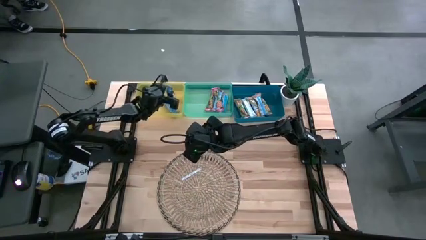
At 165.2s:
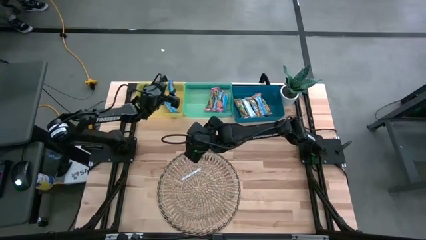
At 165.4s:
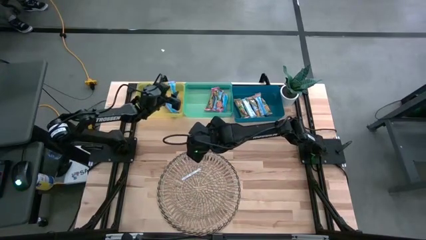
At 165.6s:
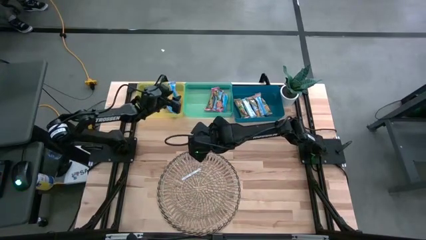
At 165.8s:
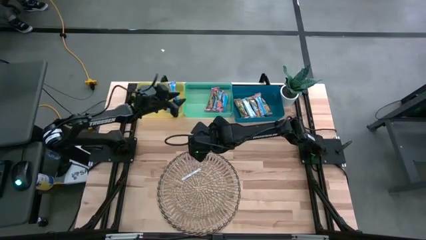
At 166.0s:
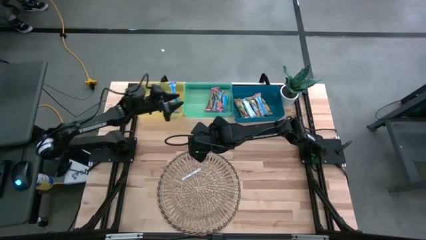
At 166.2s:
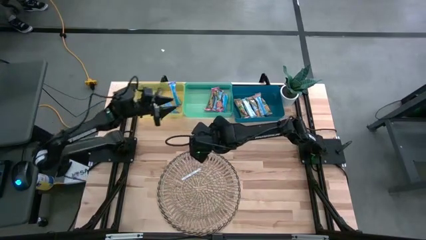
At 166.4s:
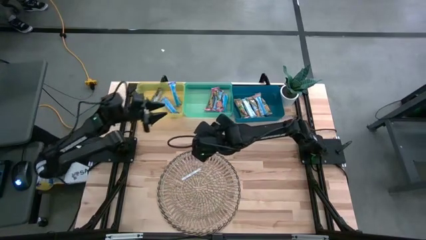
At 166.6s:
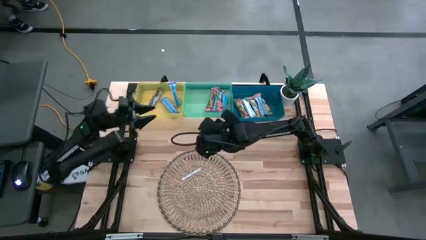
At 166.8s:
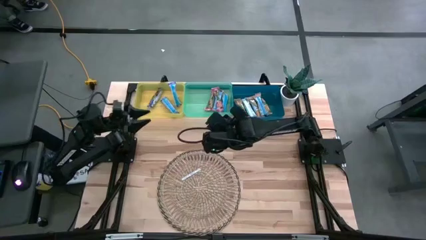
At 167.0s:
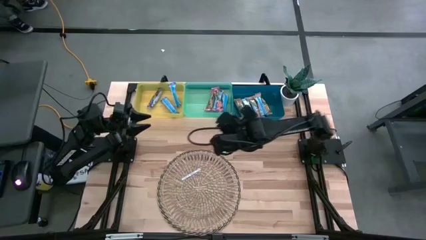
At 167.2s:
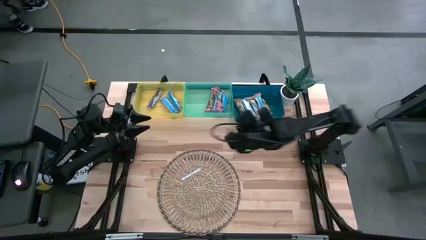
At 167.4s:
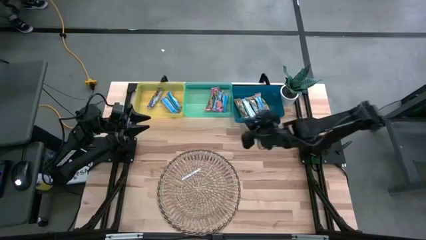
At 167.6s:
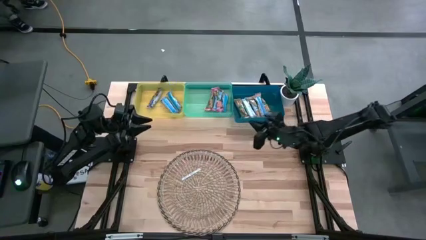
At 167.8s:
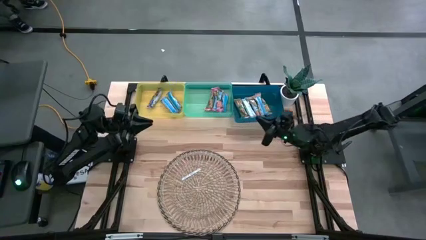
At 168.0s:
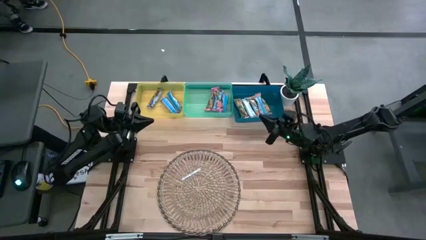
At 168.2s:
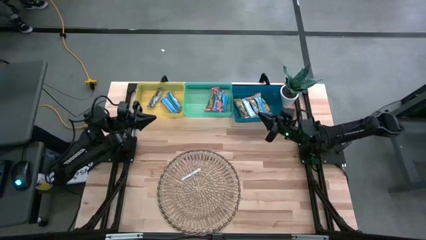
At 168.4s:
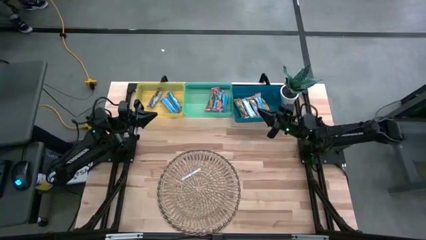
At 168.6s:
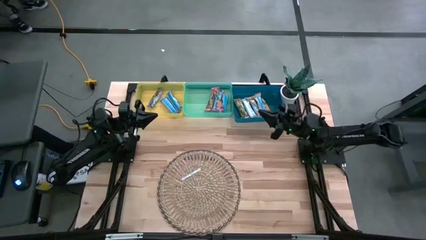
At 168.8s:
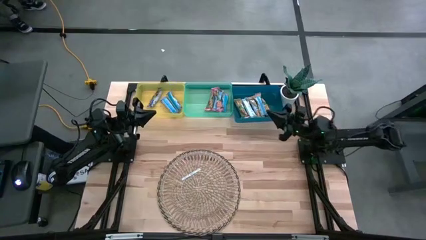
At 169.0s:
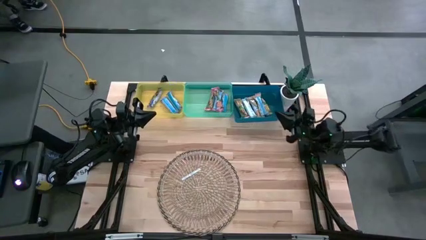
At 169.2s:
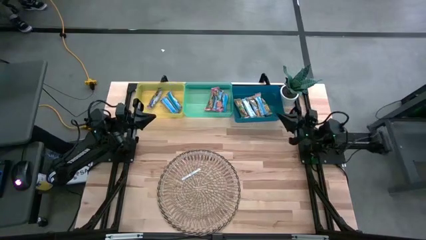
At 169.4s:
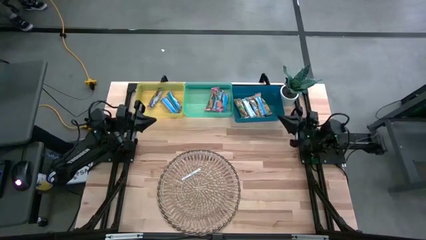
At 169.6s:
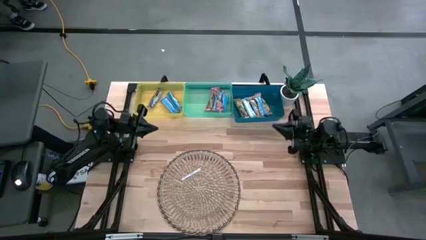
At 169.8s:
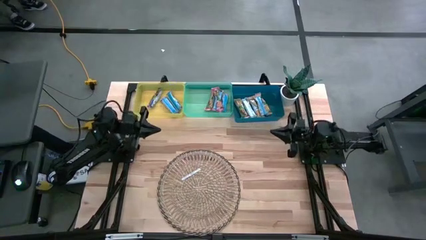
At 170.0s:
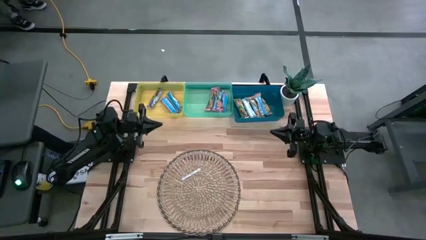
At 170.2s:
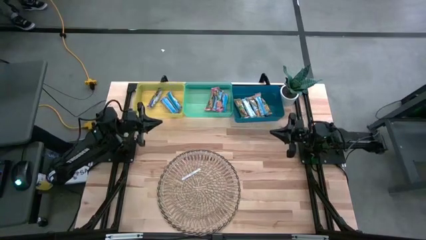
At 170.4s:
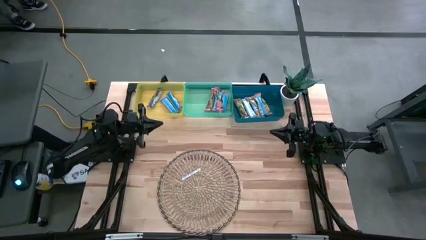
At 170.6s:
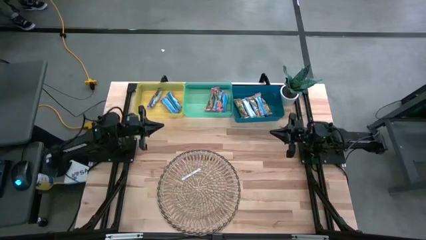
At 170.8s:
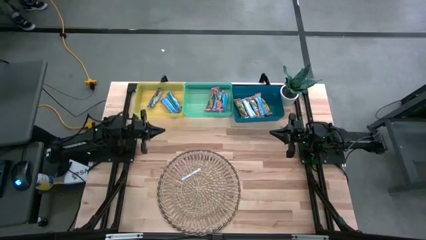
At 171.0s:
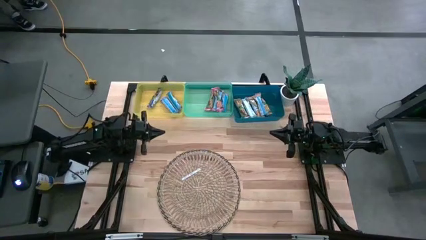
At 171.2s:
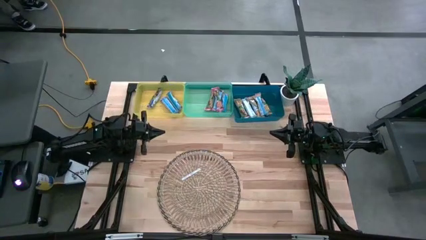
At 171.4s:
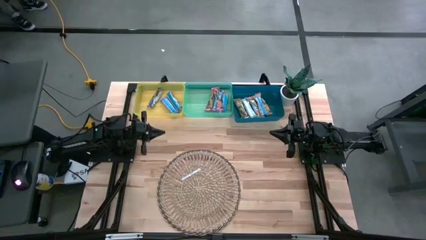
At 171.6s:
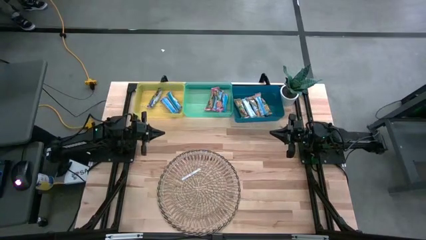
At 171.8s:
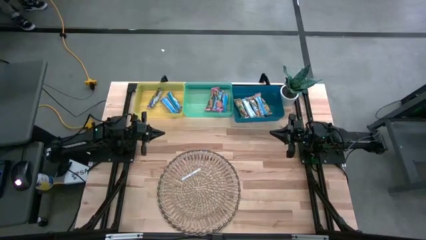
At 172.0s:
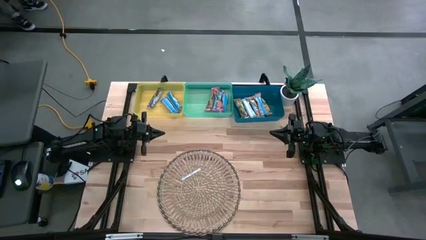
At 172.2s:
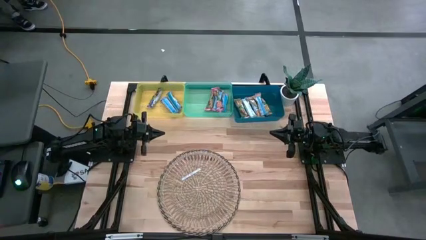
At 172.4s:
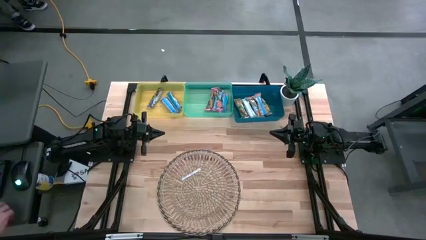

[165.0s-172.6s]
Task: Pick and place Granola Bars by type
Return to Home Position

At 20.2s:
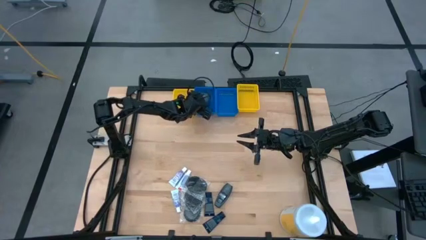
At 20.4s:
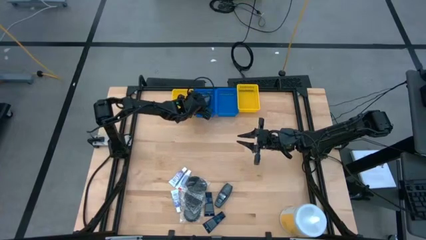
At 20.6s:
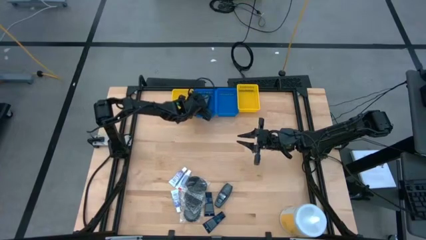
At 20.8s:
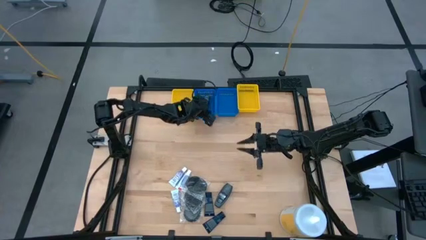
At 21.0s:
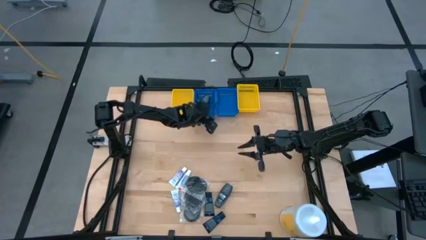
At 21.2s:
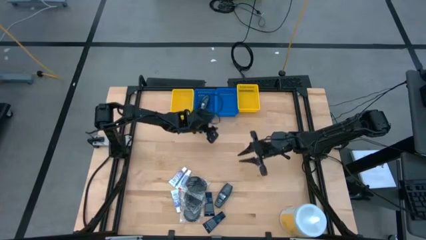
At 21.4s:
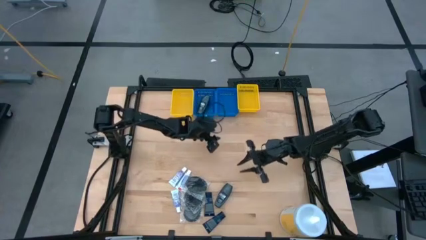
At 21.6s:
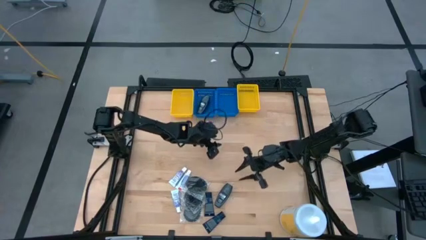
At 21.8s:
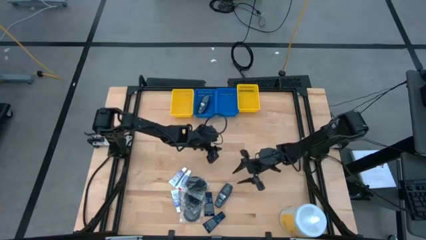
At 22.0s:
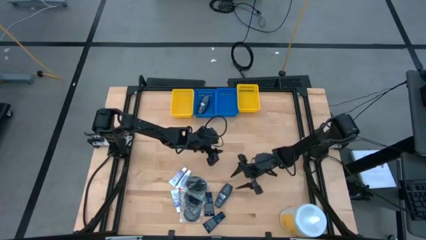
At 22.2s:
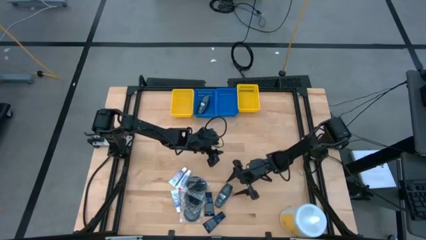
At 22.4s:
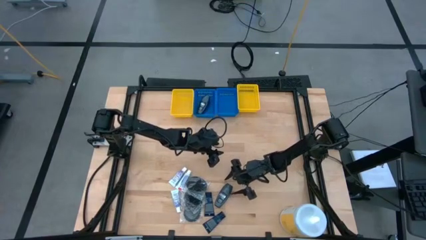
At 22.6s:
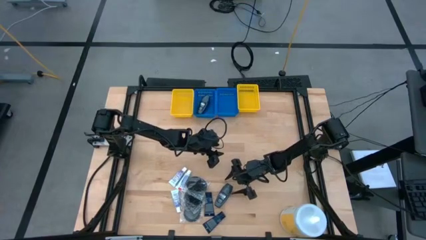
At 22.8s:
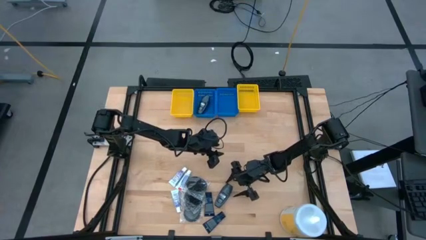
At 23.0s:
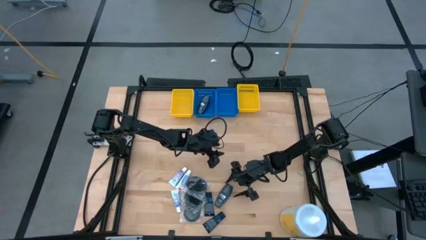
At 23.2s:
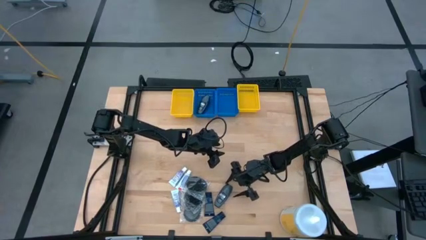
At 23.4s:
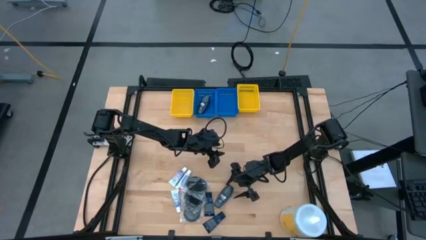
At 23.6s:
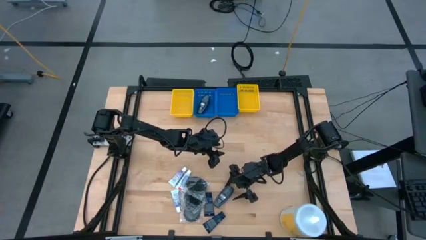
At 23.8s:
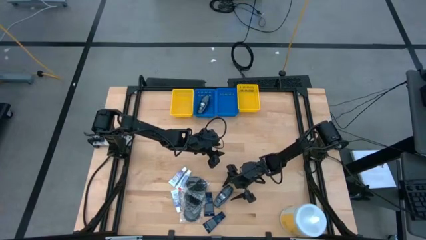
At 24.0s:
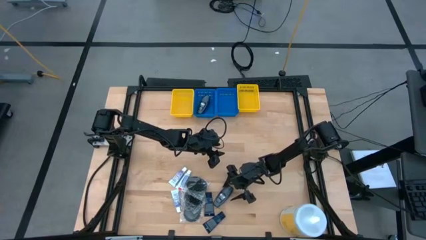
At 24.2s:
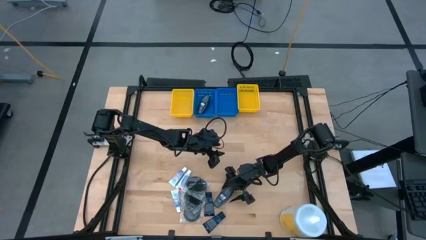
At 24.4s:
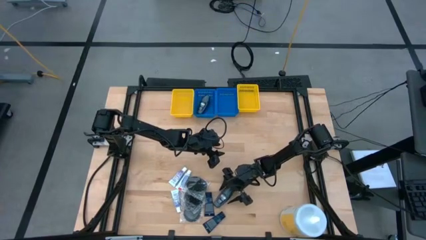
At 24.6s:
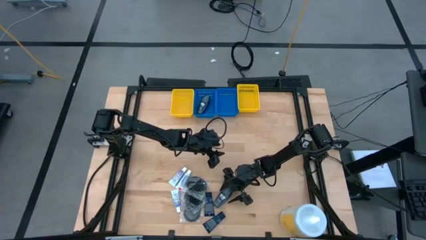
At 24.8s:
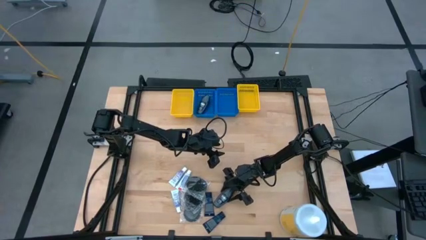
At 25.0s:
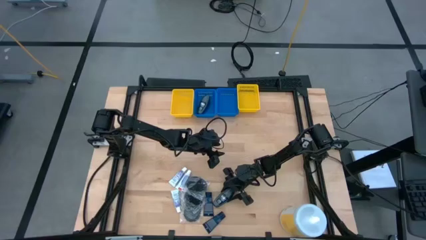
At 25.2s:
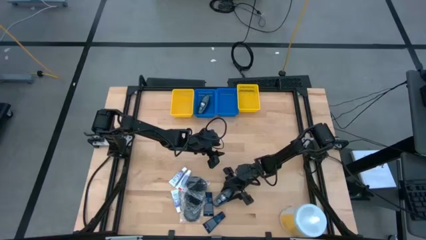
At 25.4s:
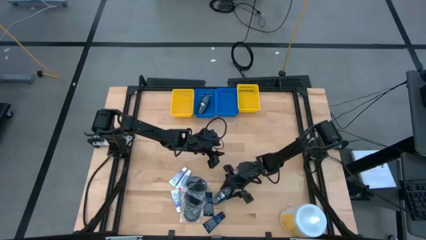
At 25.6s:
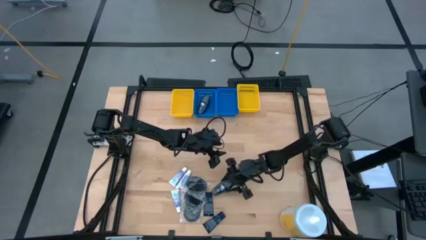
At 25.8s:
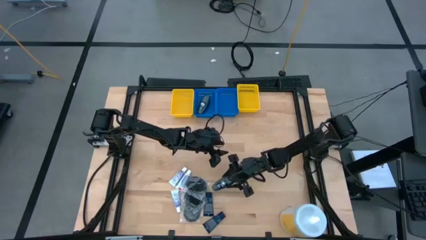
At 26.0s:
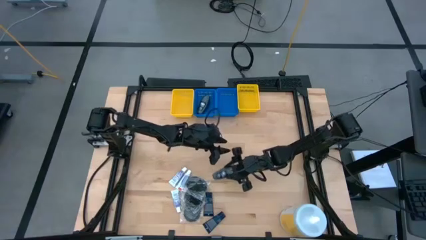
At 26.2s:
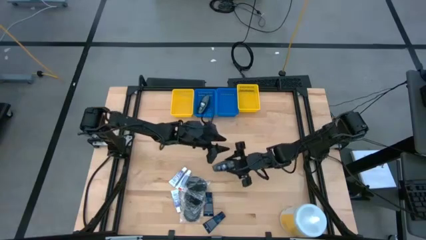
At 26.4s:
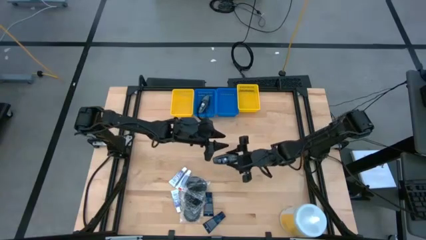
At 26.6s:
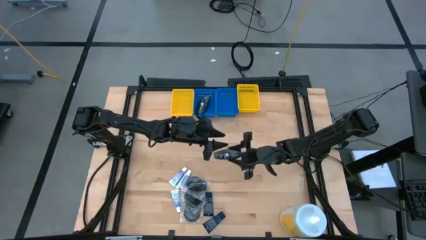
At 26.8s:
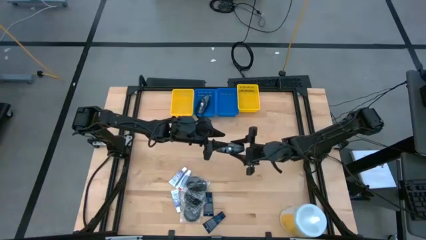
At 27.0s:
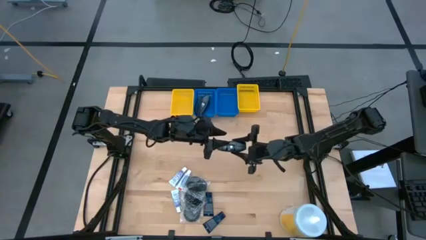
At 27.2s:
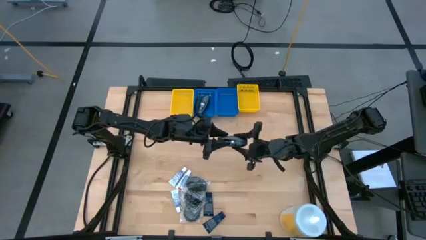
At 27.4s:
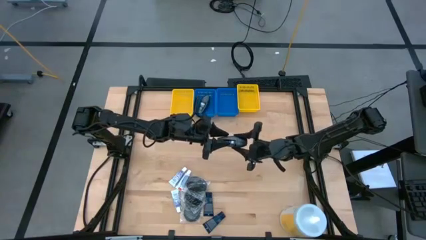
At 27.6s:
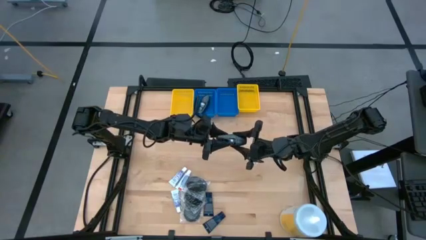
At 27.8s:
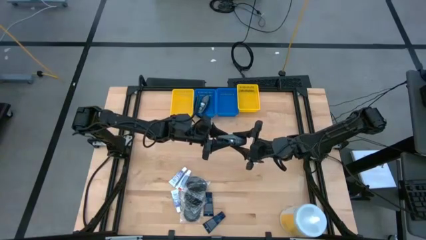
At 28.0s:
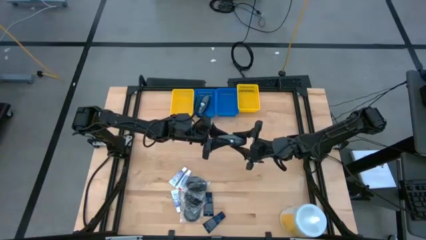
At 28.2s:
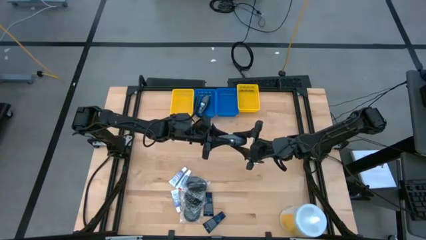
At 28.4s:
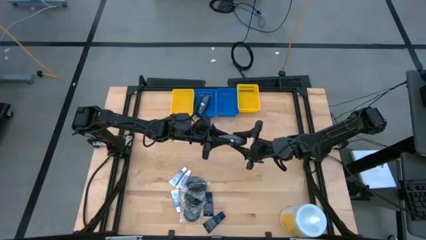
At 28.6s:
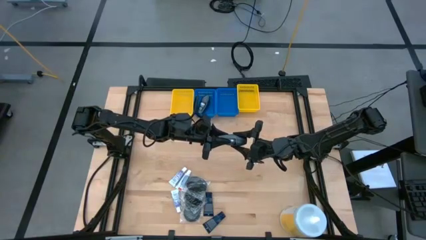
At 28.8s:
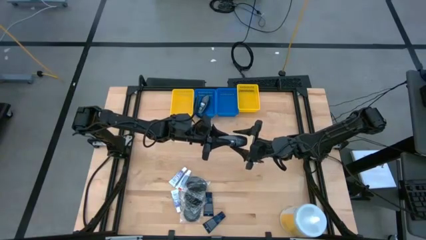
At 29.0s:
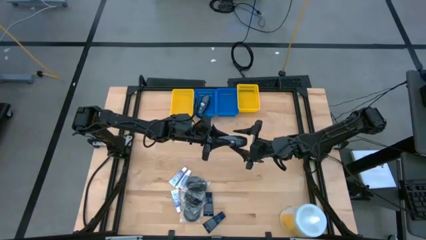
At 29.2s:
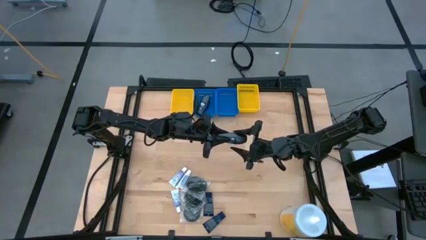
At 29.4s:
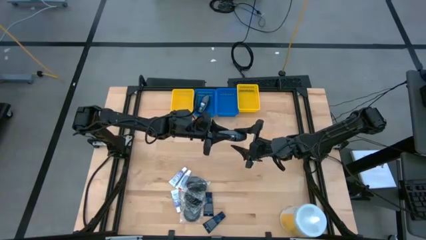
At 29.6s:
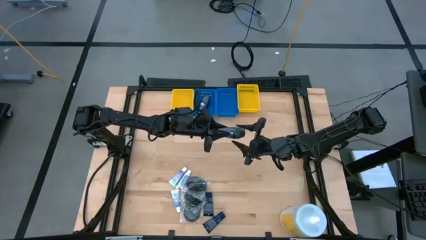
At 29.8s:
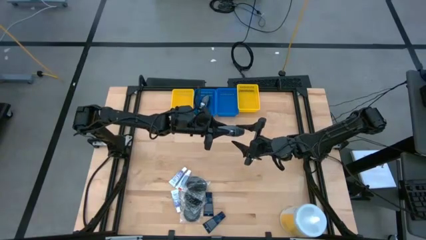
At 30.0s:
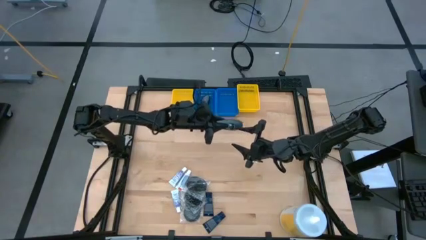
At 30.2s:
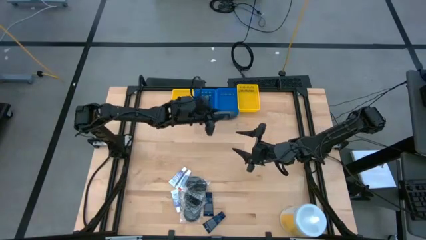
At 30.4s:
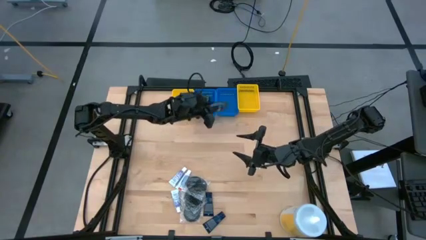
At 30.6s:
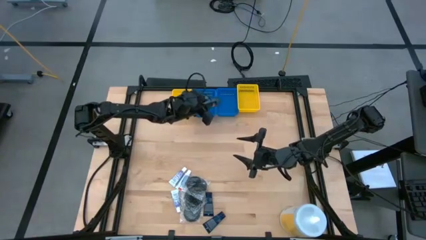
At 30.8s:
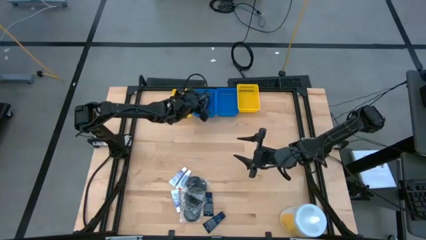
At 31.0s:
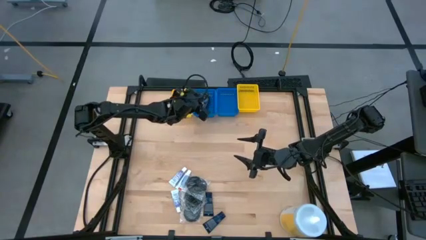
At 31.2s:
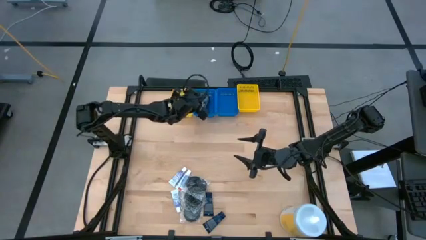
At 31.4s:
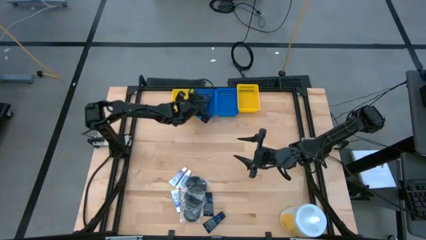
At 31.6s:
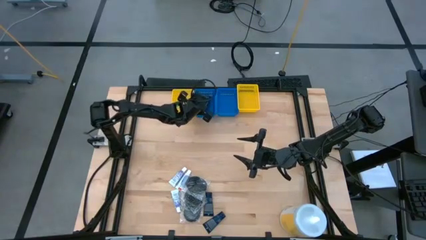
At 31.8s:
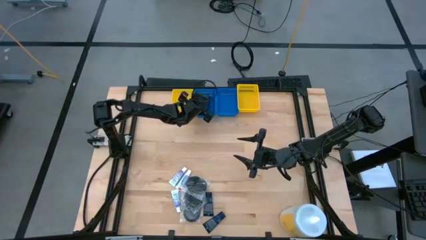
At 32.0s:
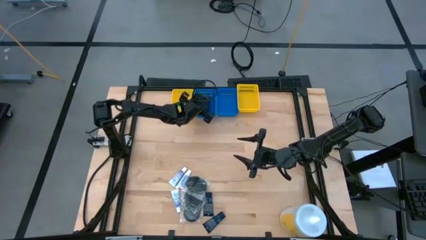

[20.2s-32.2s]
Task: Pick & Place Travel size toiletries
Put the black deodorant into the left blue bin
